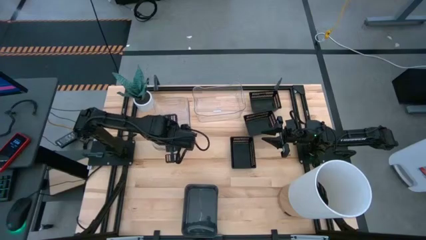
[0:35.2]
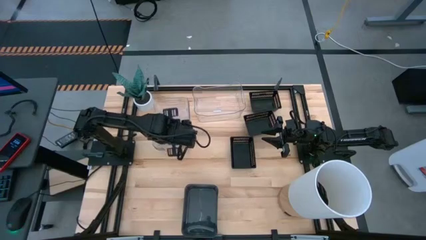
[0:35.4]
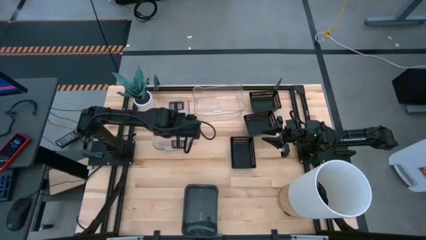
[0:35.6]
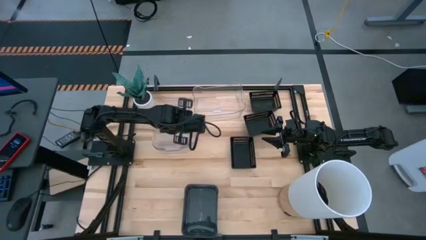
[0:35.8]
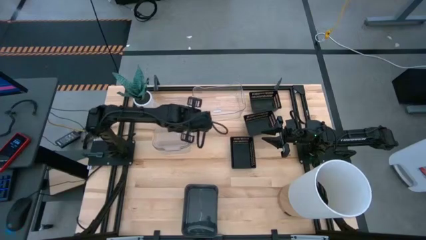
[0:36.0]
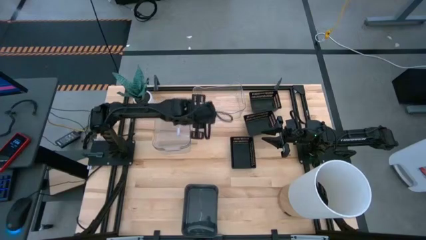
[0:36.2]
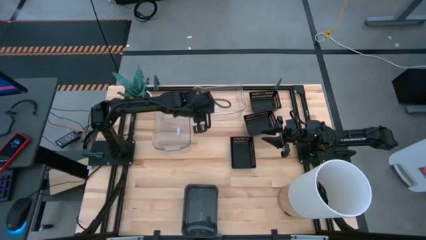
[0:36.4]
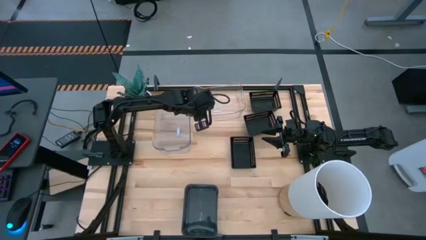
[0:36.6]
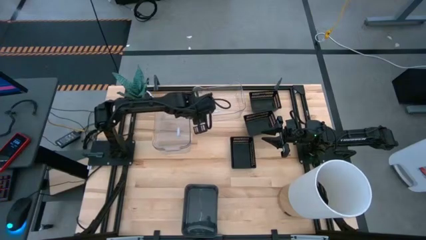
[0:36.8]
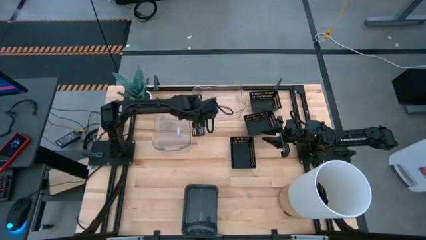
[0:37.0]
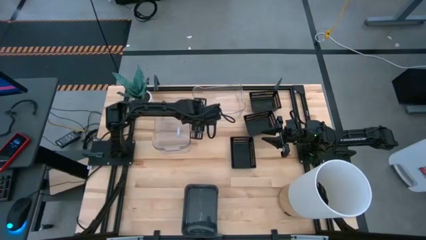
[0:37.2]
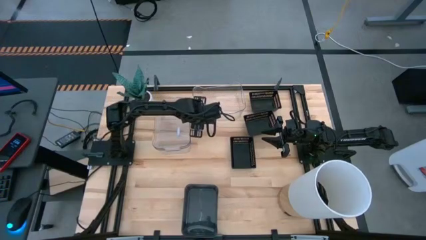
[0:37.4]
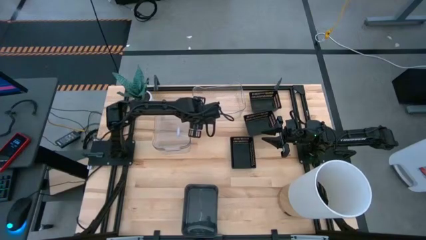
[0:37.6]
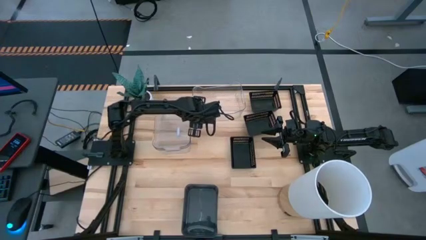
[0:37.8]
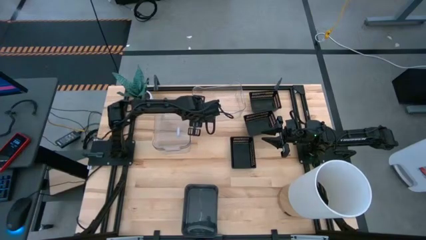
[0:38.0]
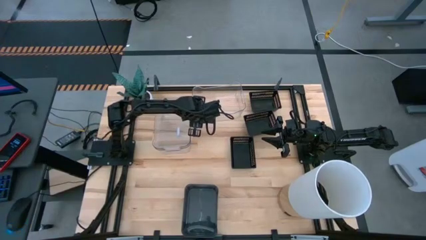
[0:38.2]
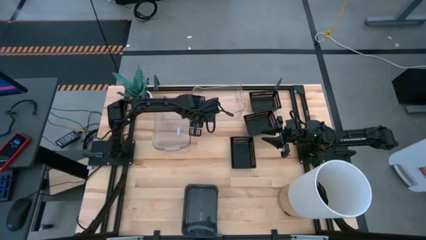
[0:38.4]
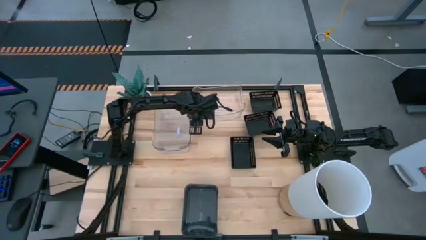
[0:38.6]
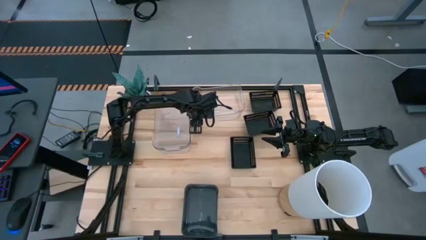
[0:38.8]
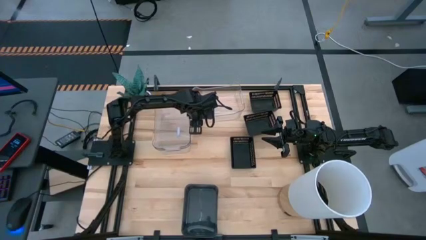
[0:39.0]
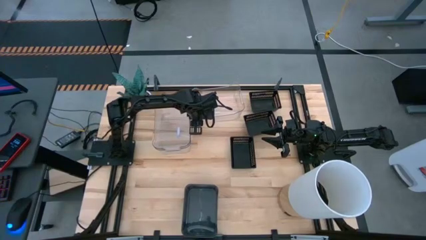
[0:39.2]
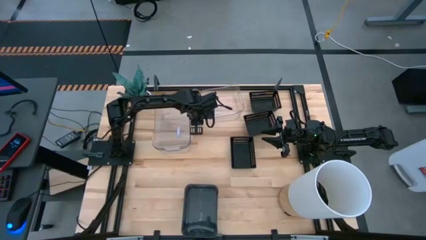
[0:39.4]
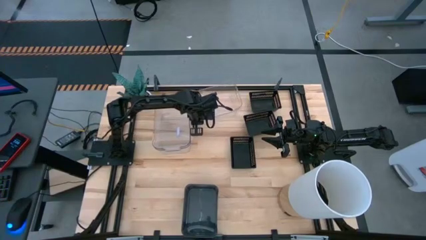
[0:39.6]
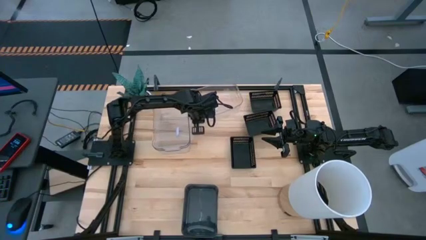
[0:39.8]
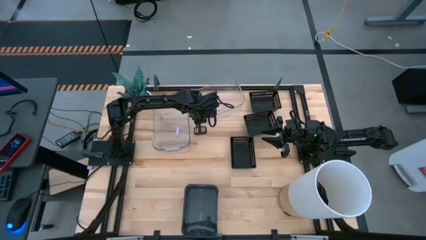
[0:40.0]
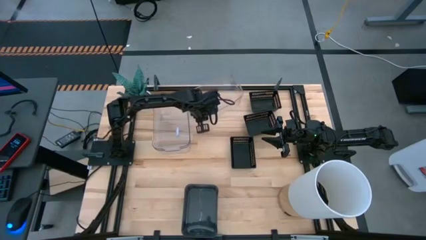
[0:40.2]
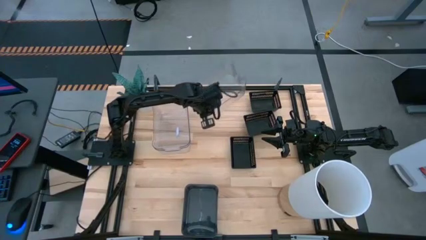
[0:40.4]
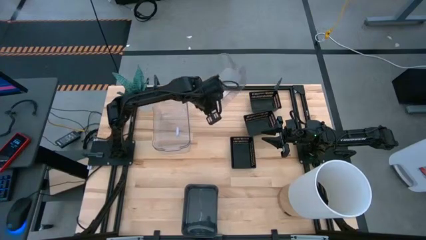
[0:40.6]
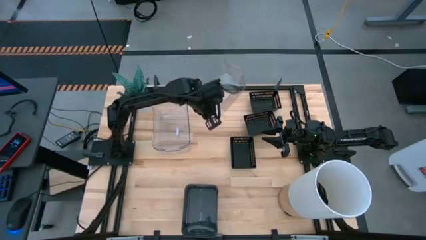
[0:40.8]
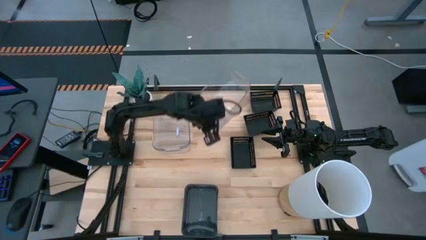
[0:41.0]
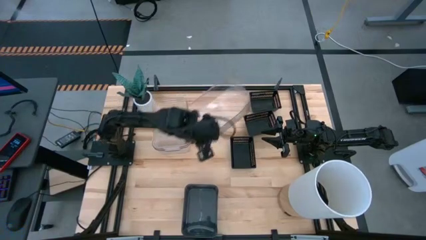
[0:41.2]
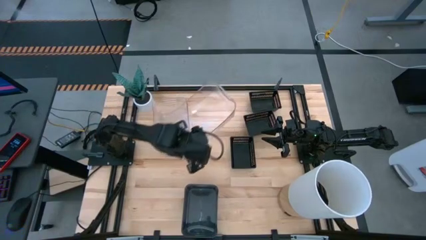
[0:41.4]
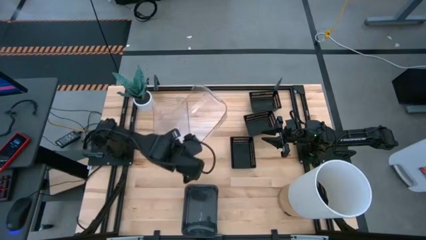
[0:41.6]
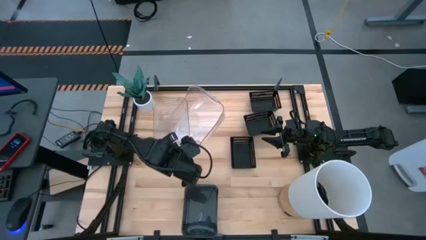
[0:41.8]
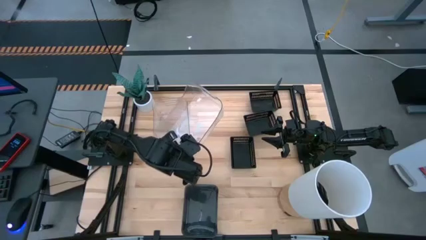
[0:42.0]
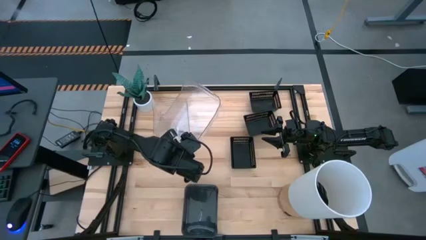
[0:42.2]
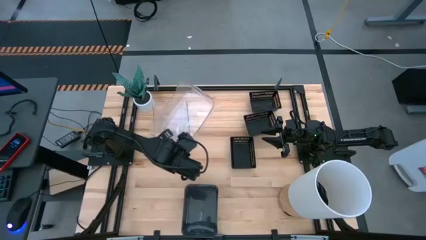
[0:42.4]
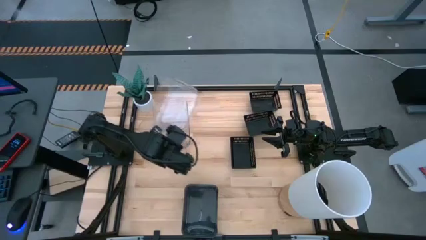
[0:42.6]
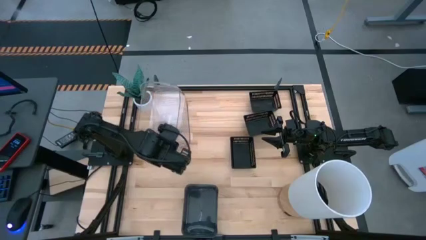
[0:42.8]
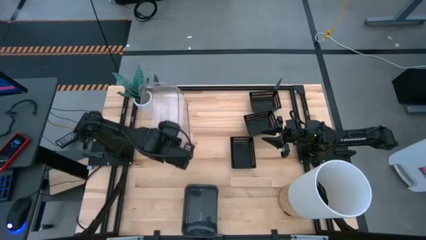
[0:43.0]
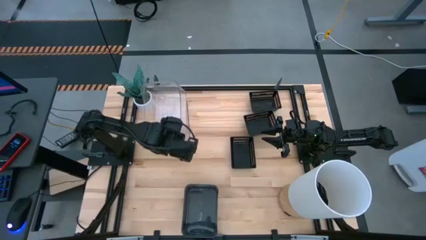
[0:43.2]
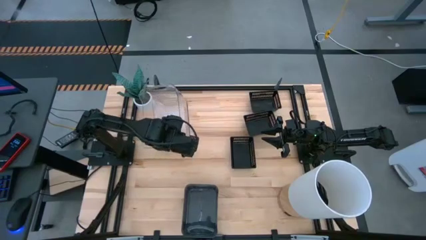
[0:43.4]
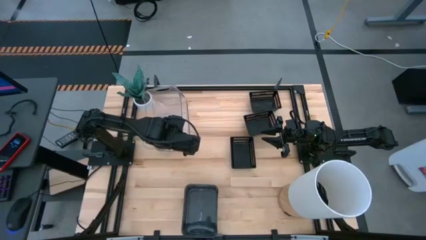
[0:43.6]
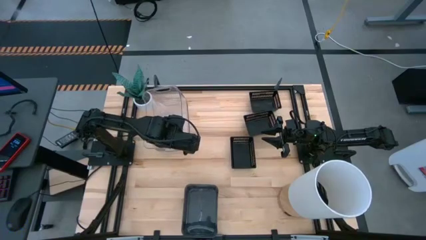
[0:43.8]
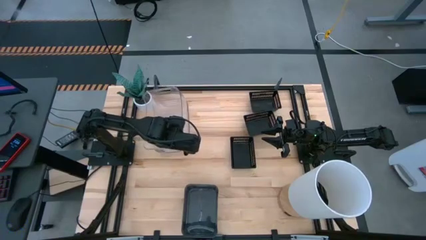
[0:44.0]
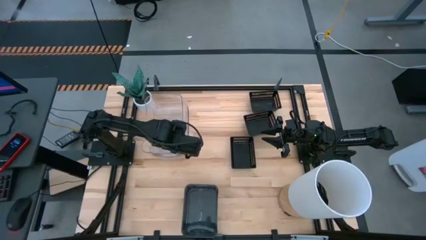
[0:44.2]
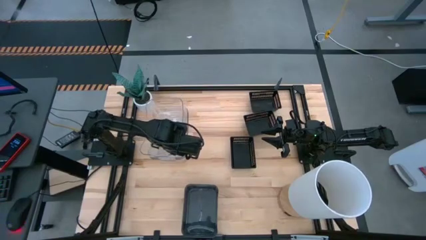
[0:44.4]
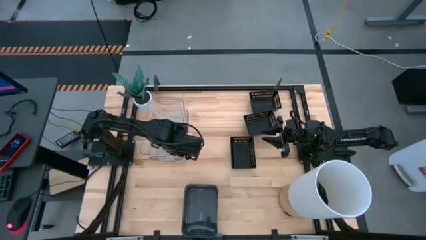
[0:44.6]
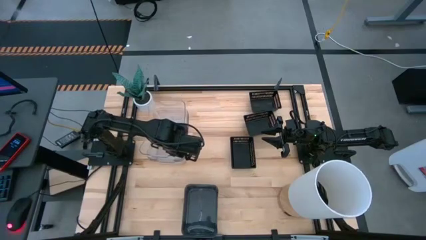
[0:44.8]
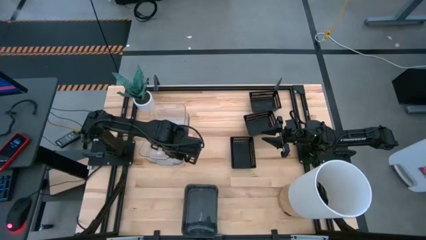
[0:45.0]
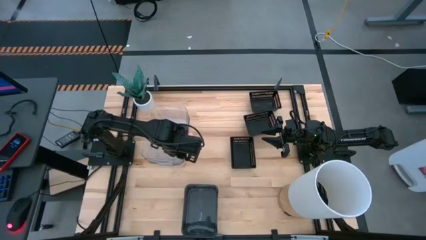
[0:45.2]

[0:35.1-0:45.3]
Stack the transparent bin on top of the stacked transparent bin

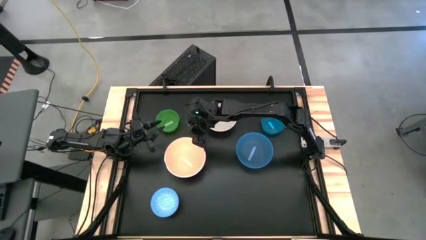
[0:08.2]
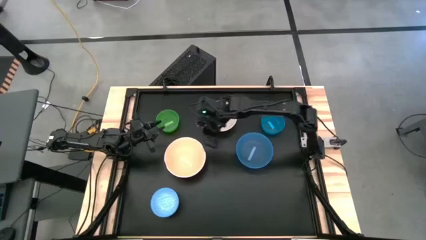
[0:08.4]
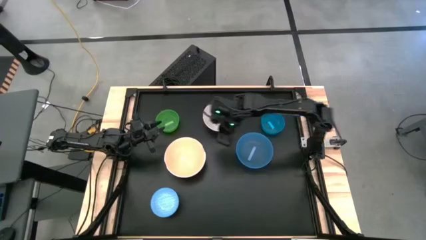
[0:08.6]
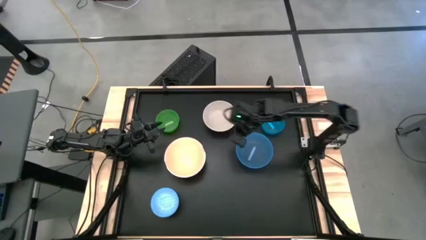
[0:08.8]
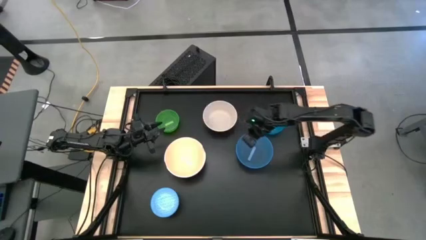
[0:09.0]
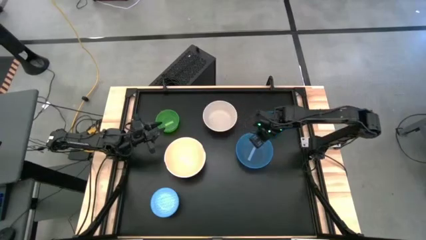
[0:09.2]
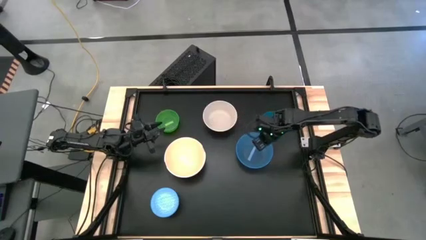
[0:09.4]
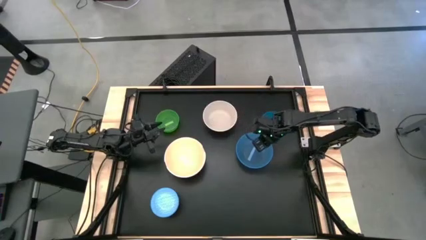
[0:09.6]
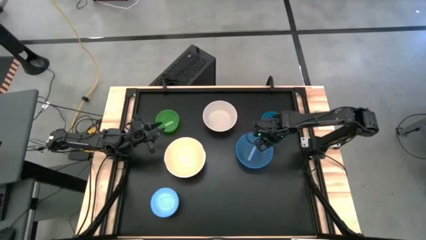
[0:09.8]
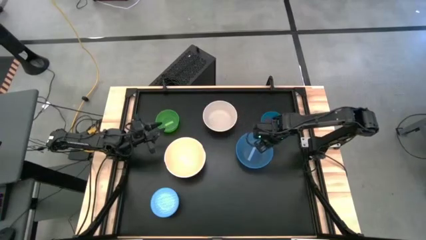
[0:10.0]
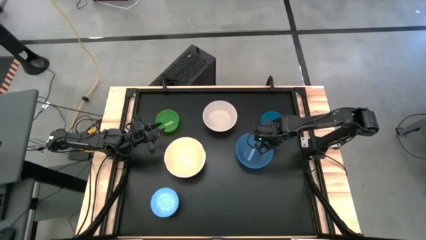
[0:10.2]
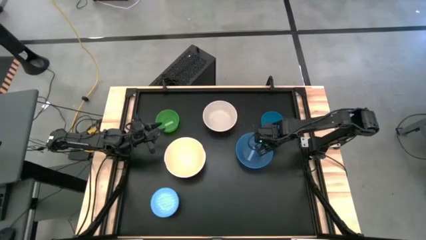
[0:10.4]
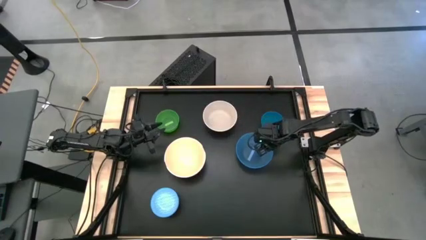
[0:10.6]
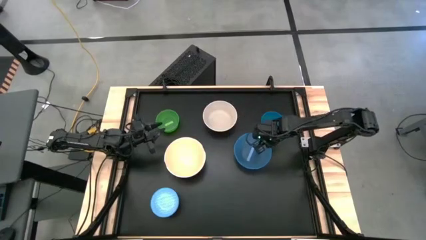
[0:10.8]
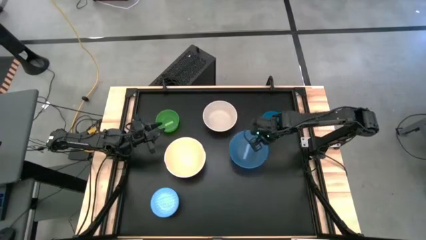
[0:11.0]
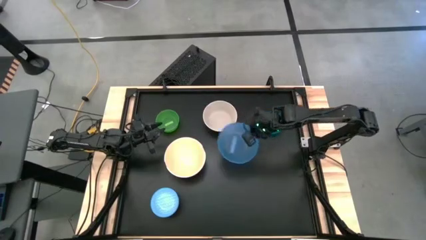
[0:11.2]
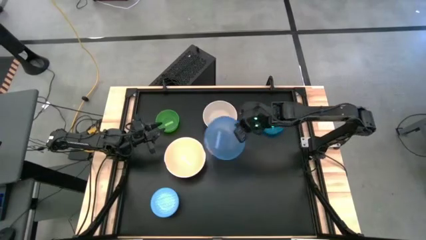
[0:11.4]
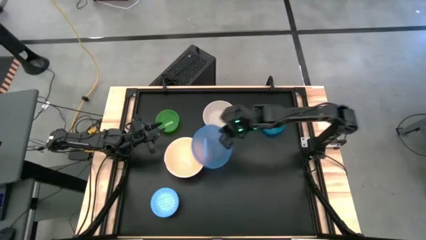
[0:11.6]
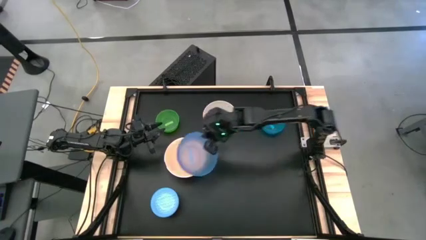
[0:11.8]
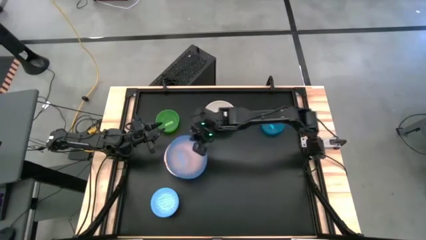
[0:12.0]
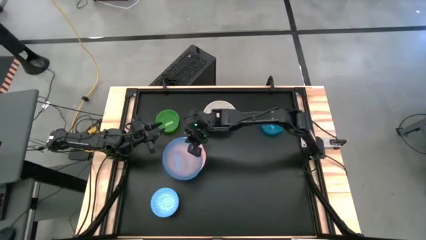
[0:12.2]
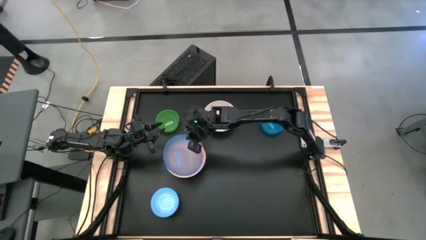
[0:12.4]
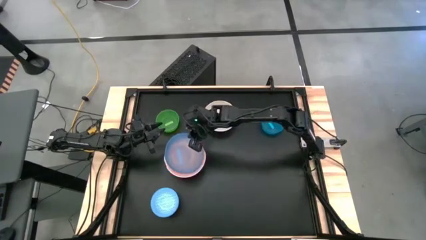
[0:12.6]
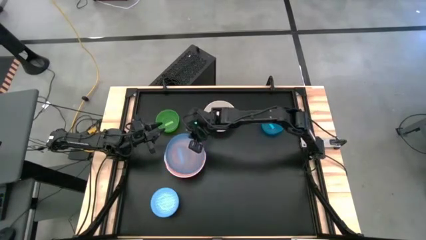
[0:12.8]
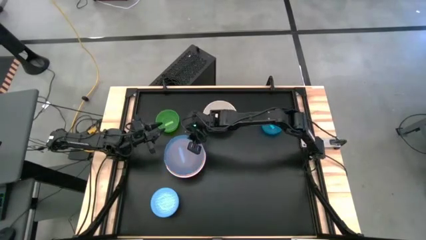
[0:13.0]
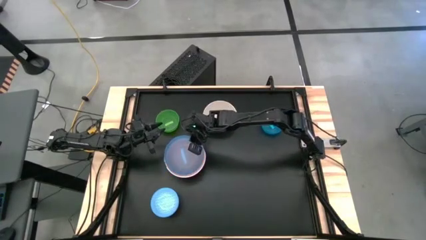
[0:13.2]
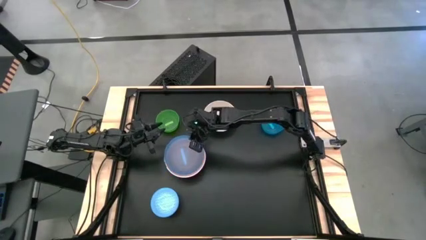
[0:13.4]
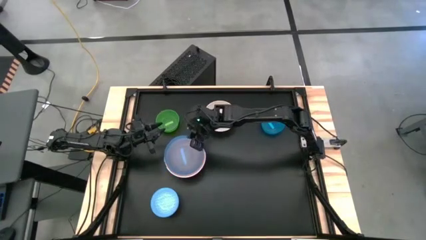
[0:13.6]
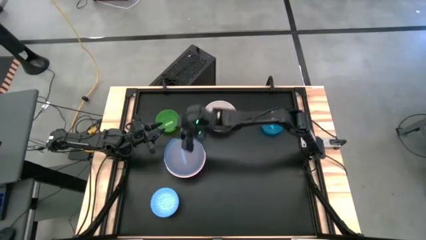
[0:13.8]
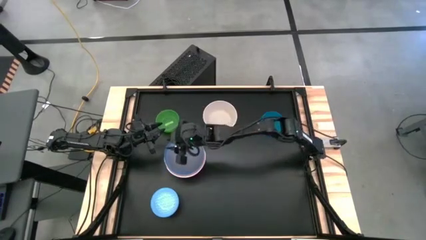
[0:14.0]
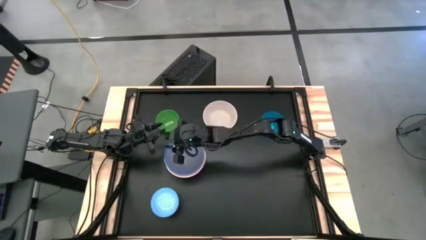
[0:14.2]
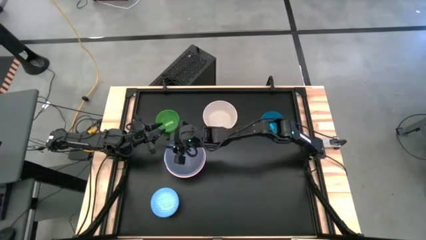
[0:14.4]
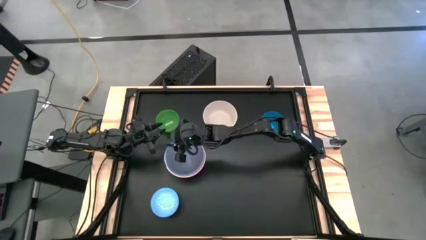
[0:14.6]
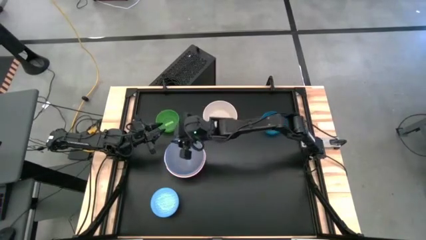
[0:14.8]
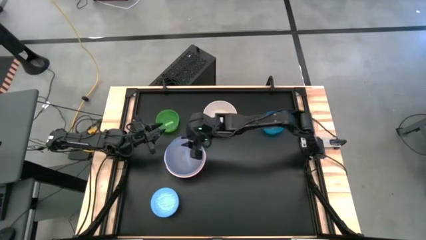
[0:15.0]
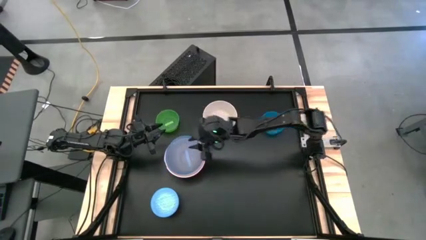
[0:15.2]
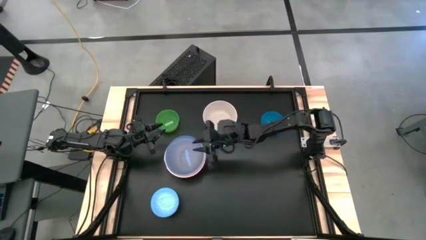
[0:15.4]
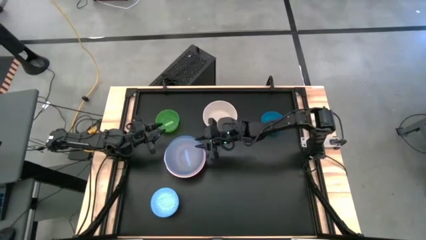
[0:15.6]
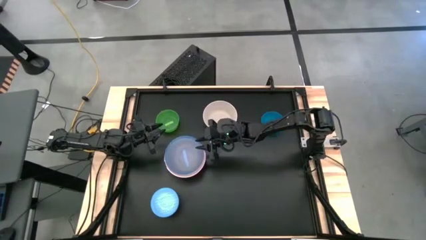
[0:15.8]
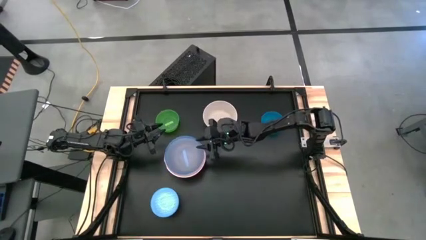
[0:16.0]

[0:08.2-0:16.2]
Stack the large blue bowl on top of the orange bowl
